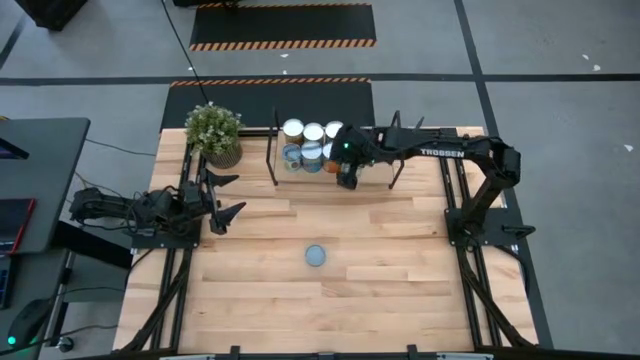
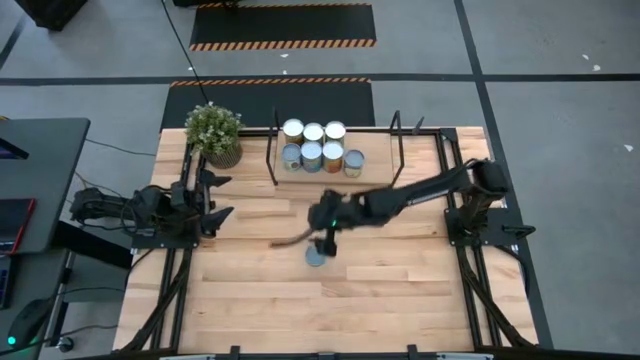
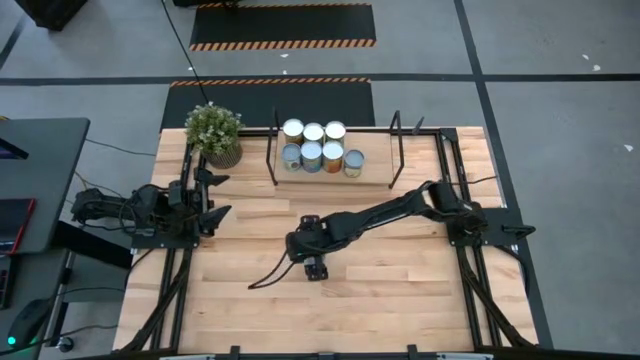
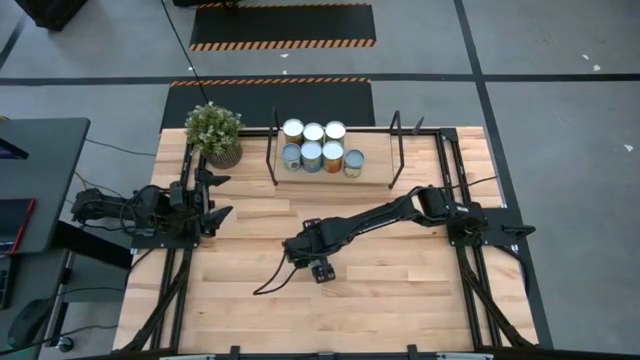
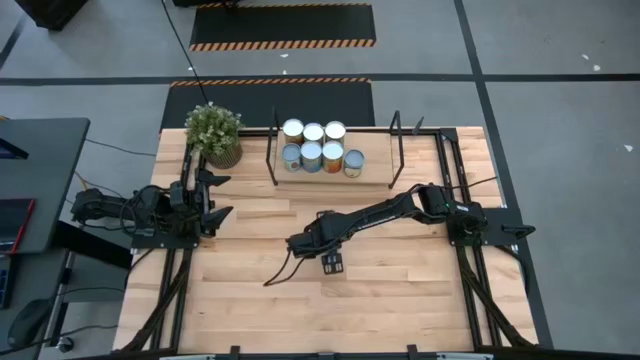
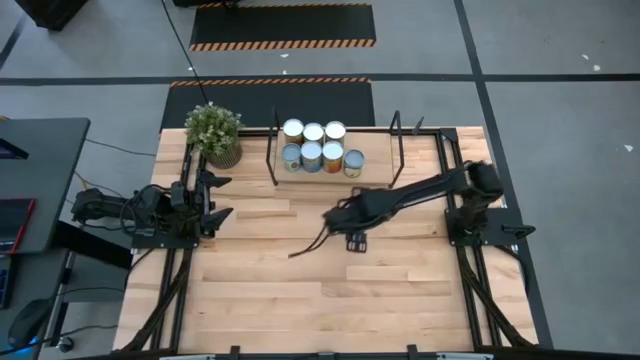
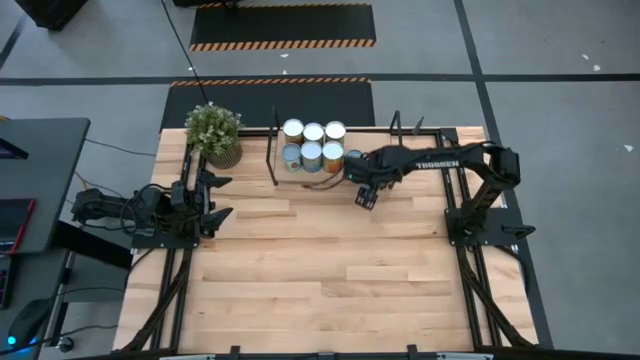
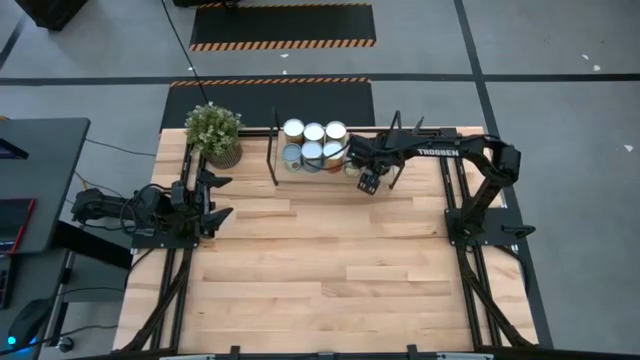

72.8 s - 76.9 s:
Task: Pick and place cans onto a shelf
Put the canned tuna fish on the shelf

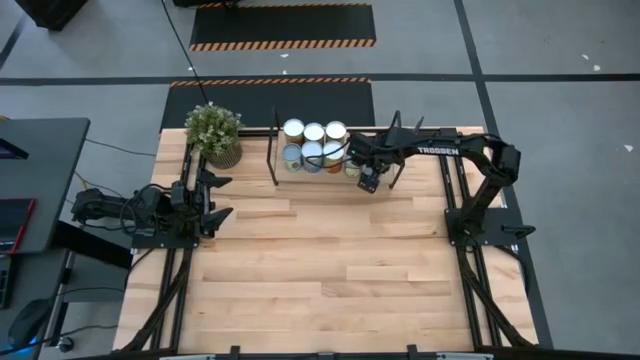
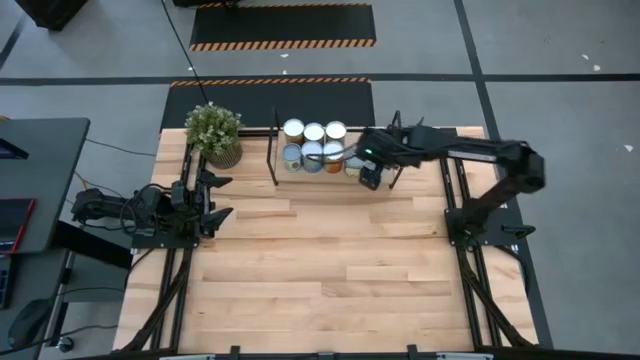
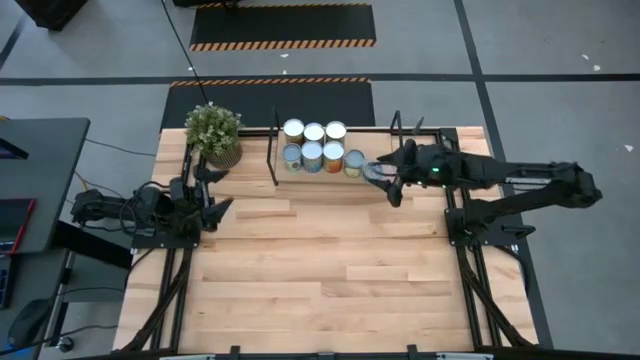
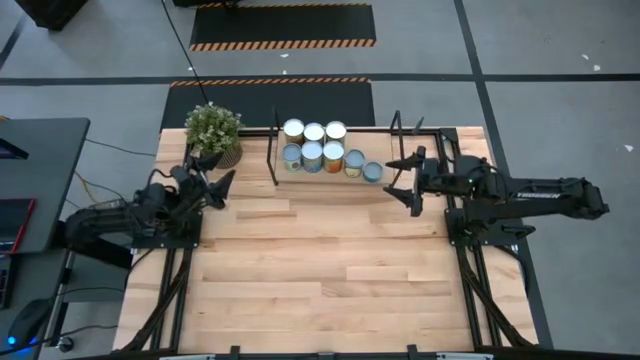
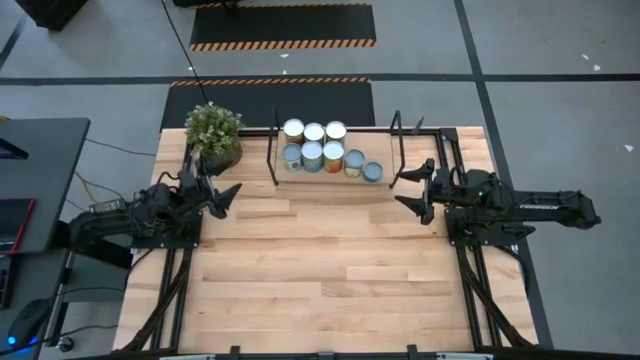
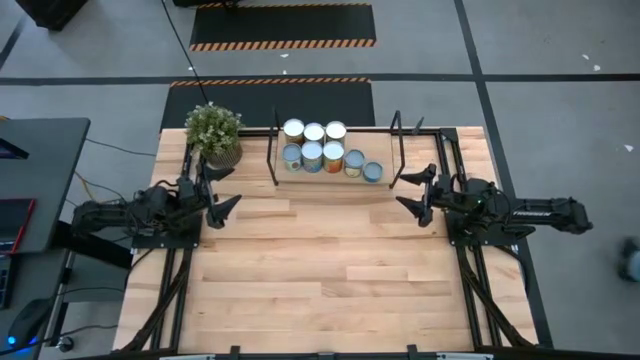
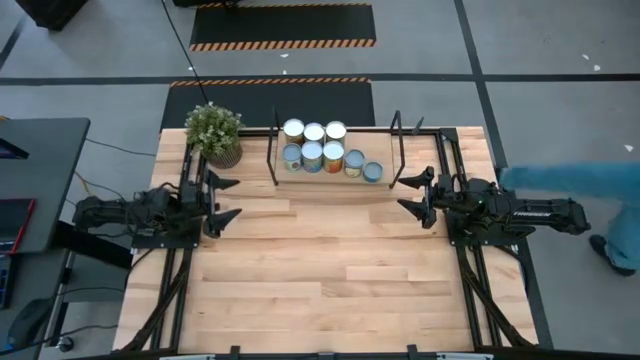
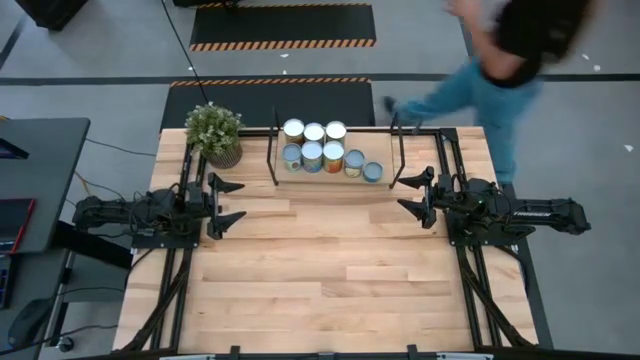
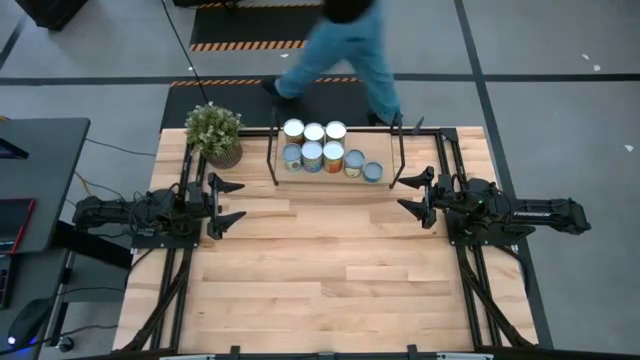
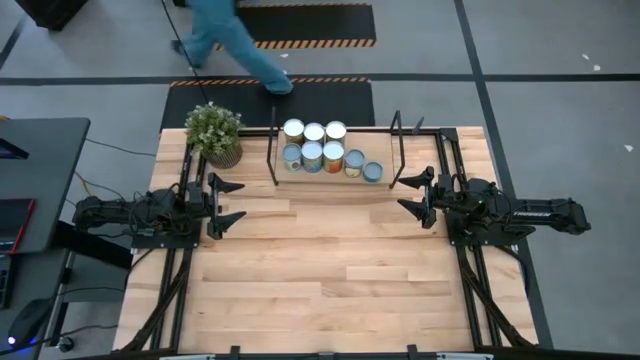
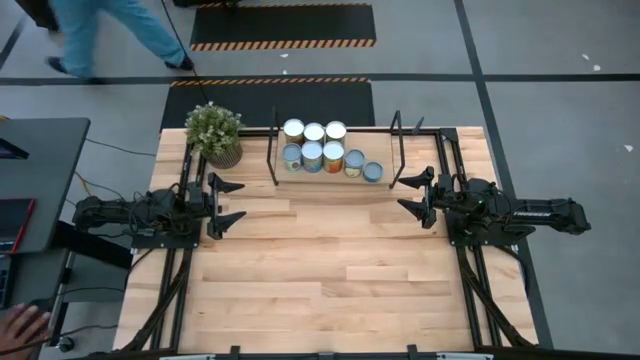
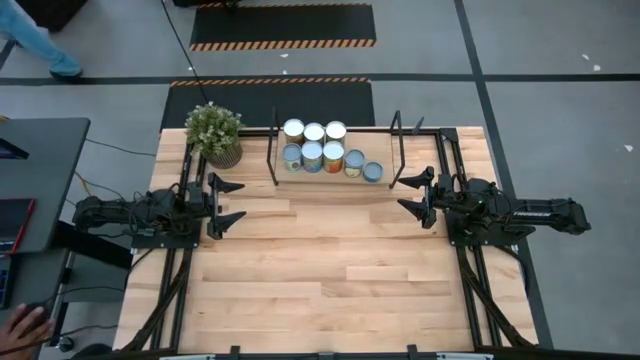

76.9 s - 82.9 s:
Return to Home Position

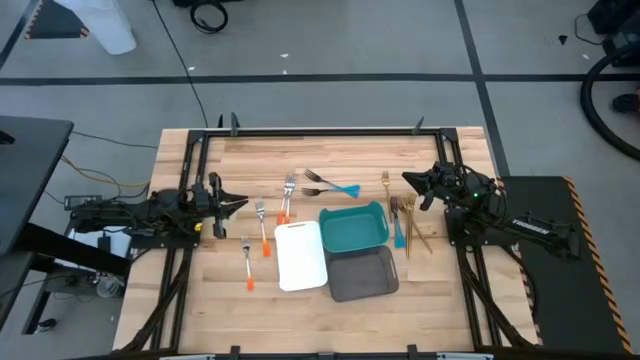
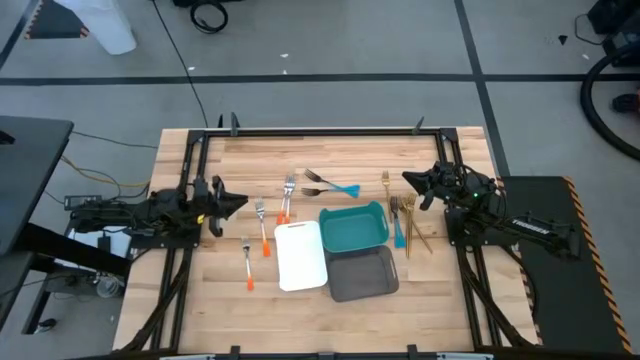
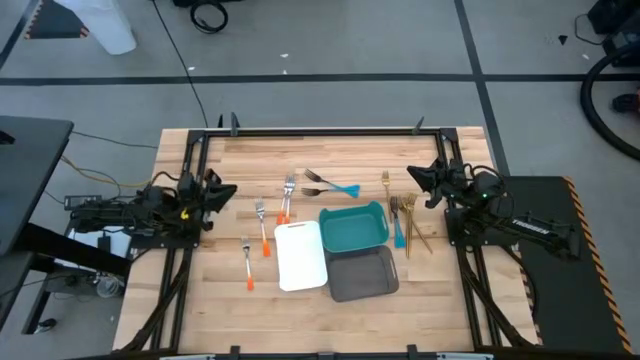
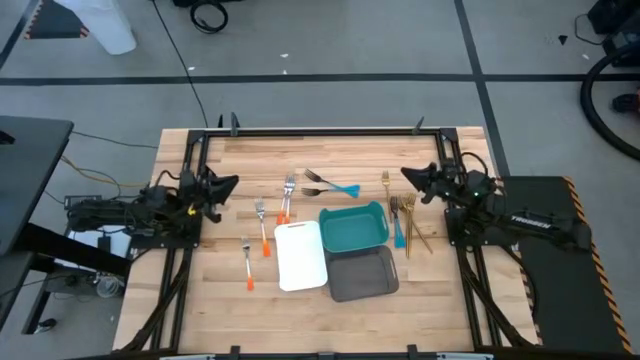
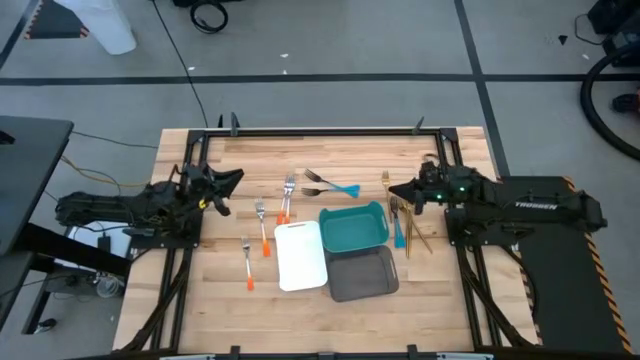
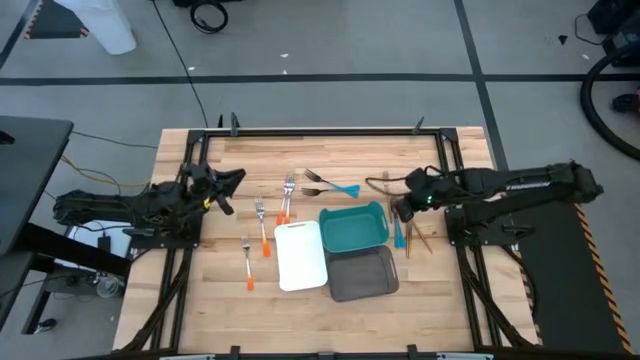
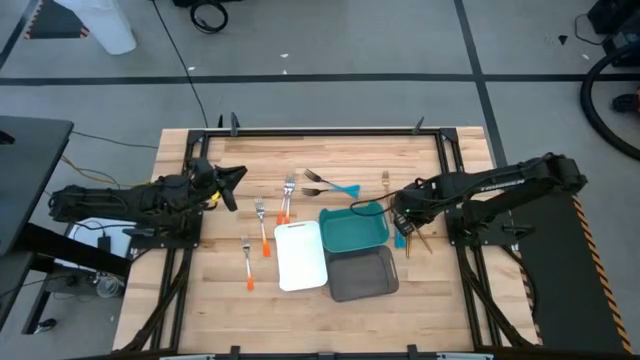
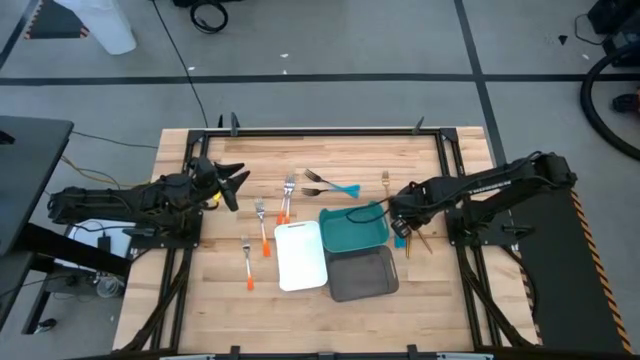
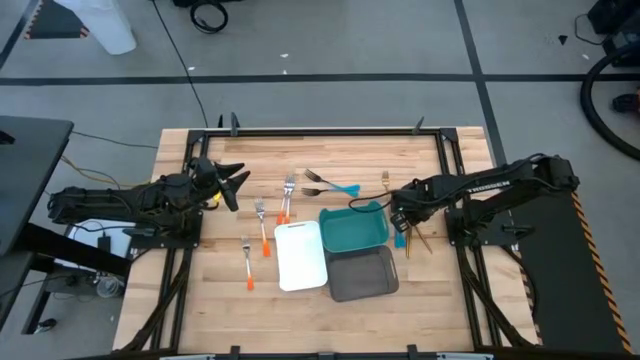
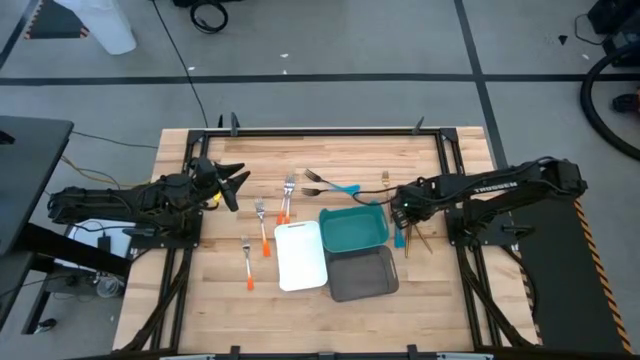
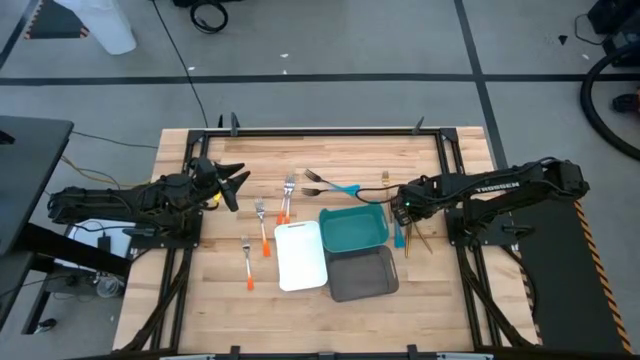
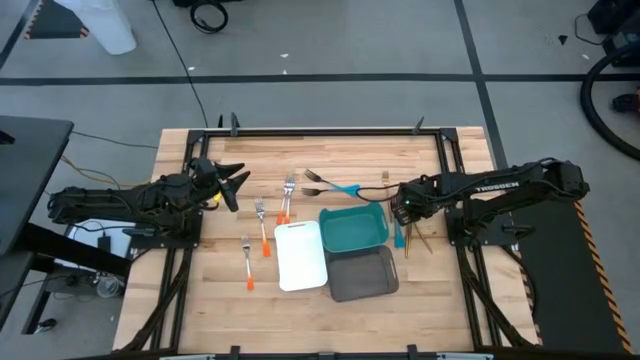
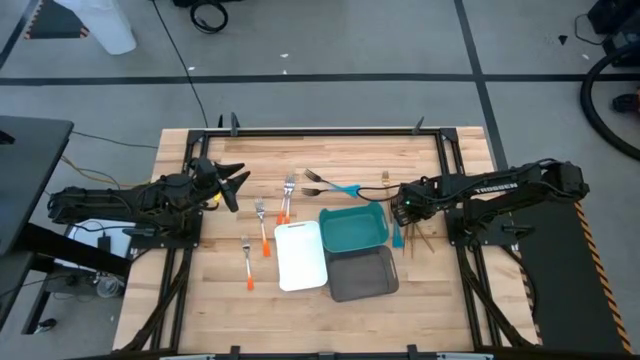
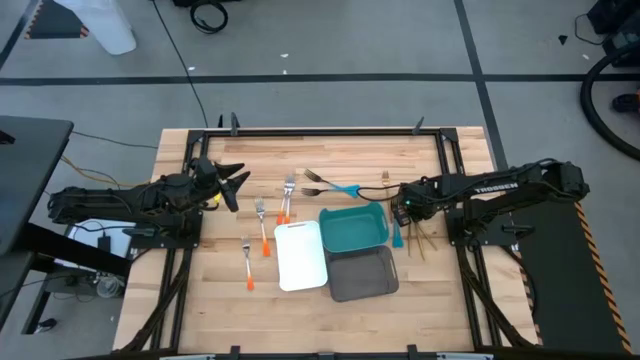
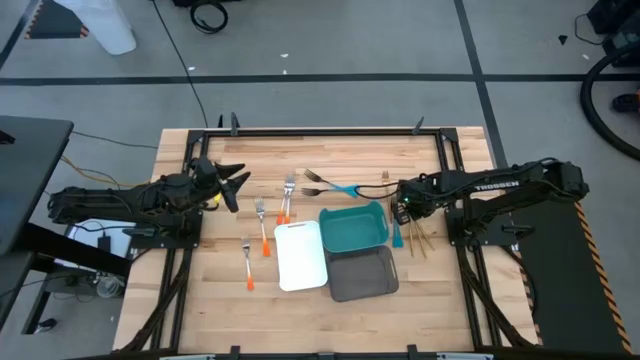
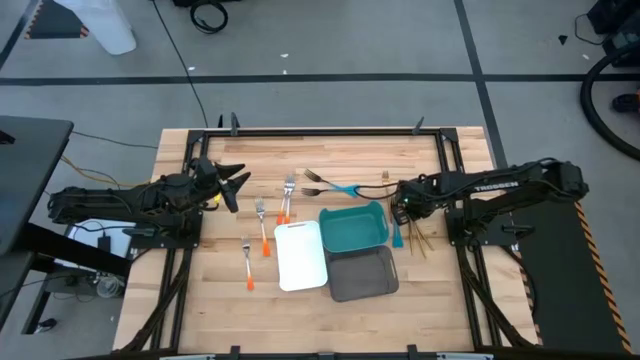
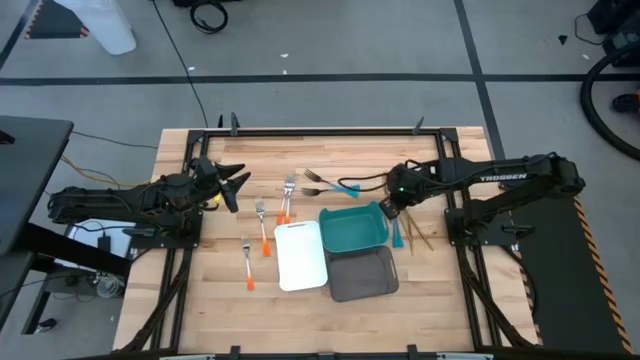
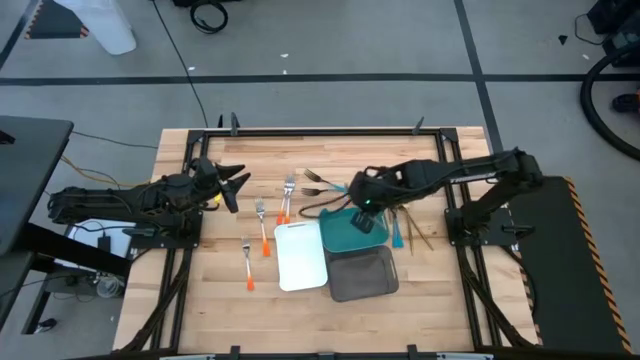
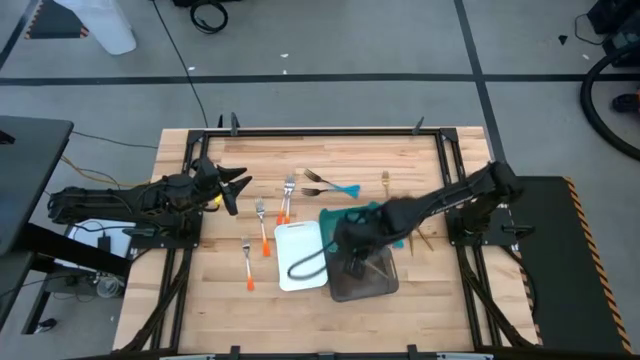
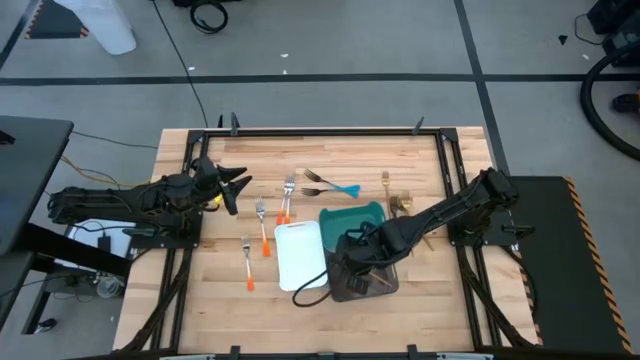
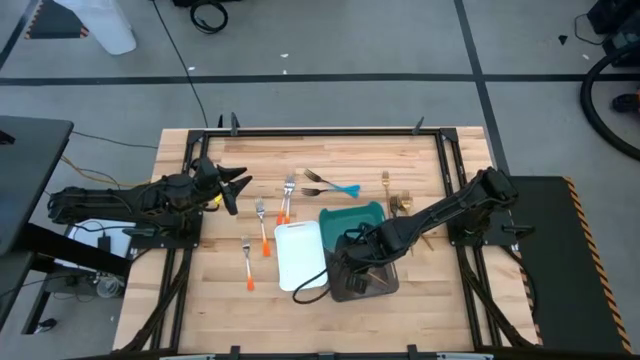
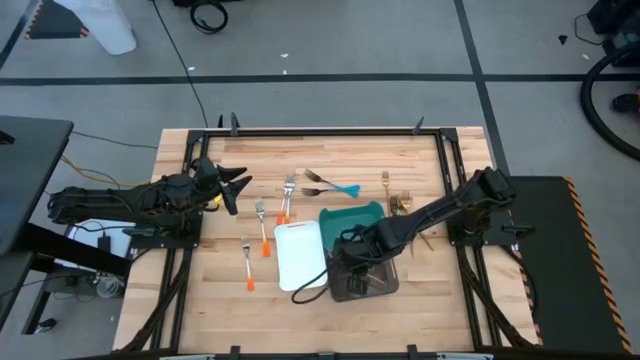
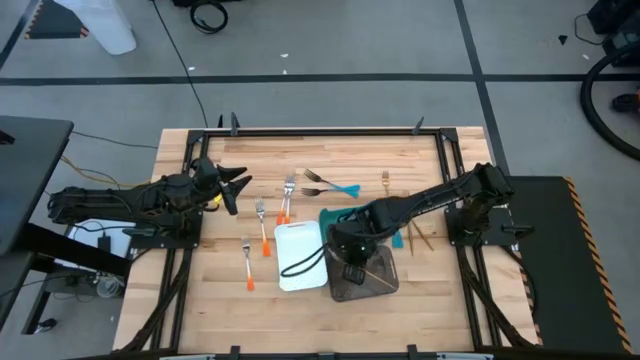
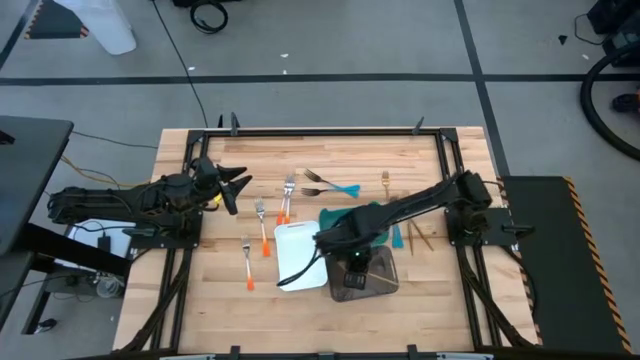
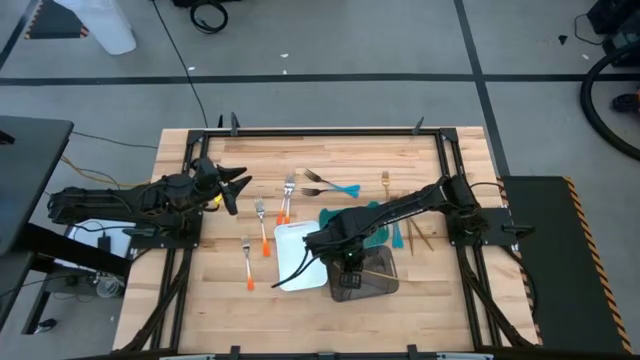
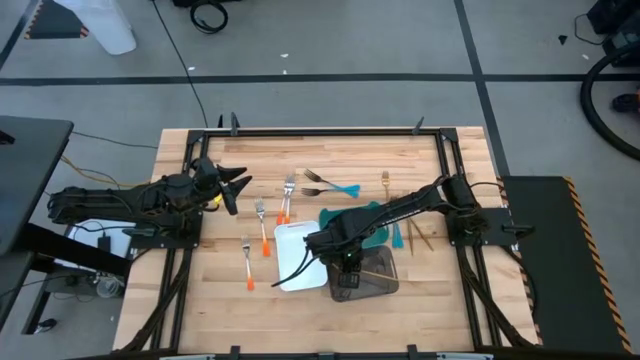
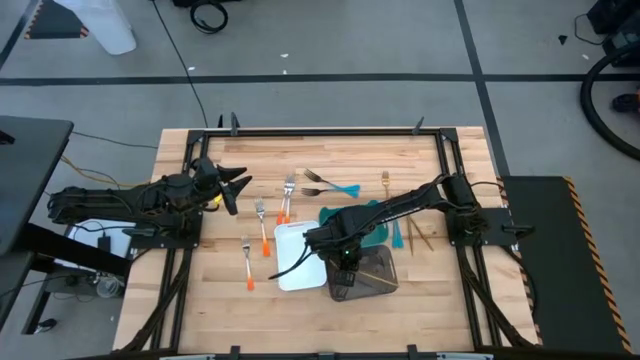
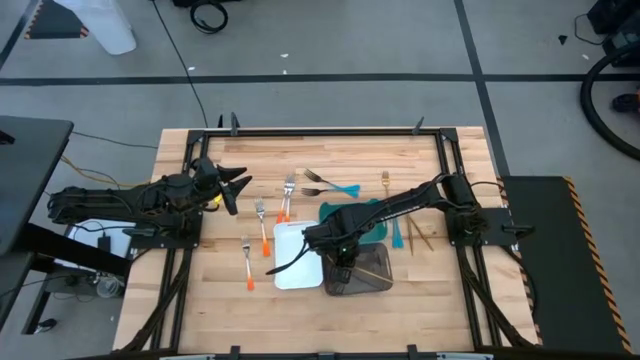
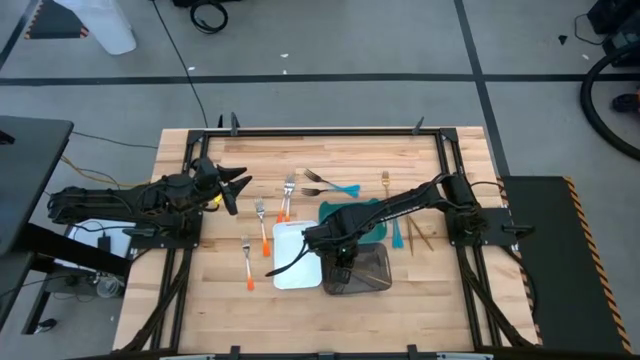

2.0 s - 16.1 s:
Task: Sort silverware by color (type)
Put the gold fork into the black bin
